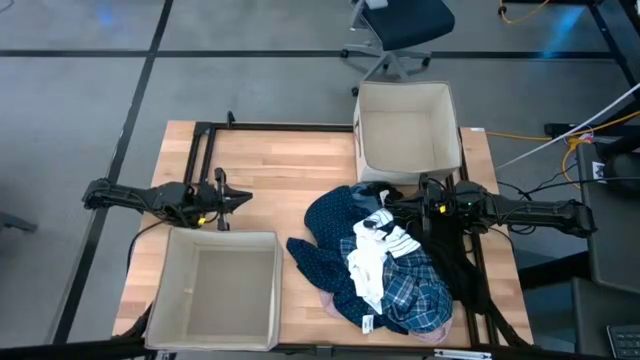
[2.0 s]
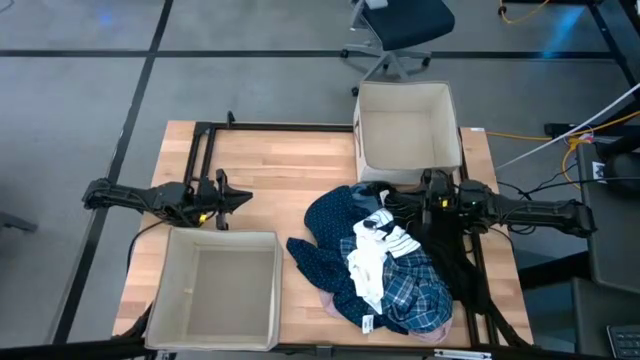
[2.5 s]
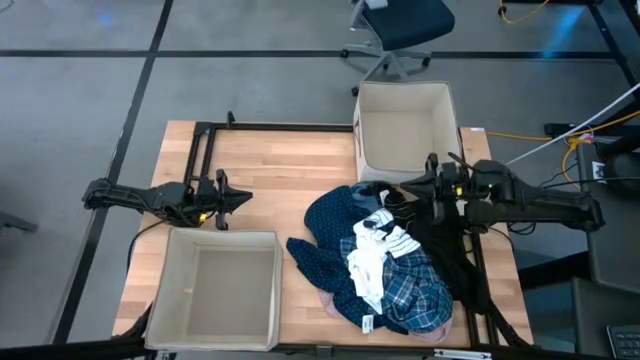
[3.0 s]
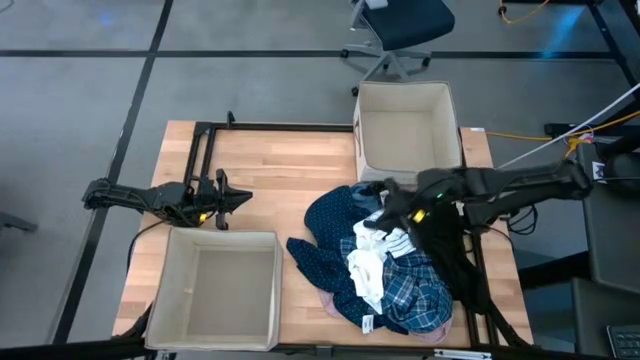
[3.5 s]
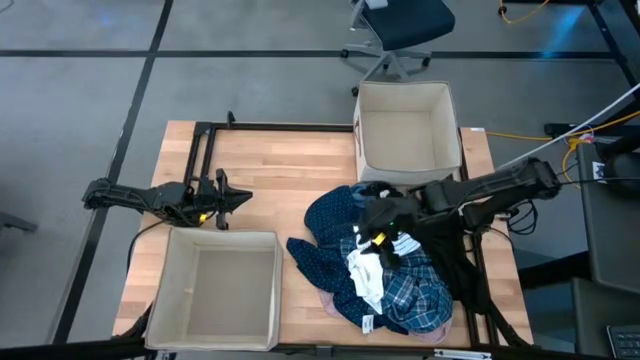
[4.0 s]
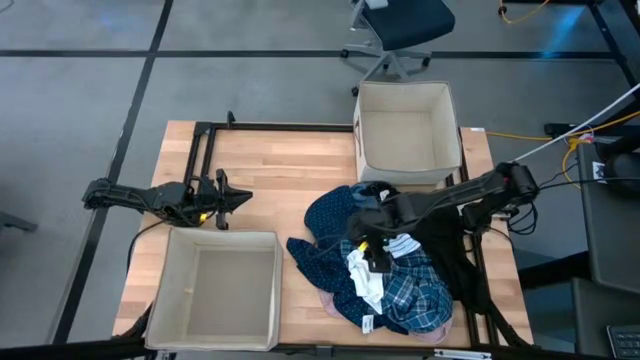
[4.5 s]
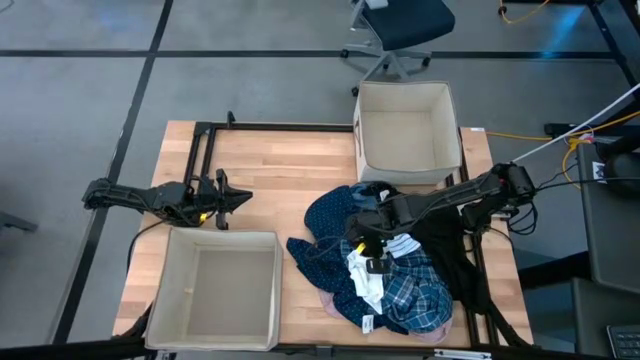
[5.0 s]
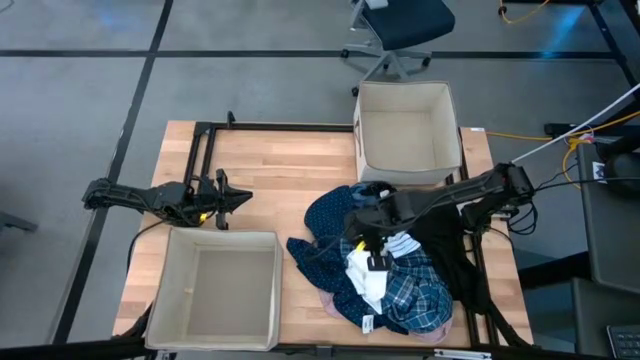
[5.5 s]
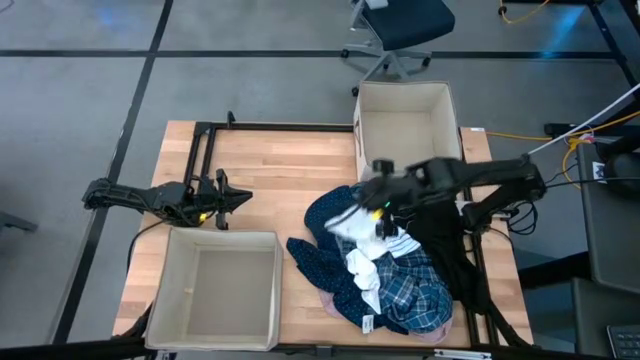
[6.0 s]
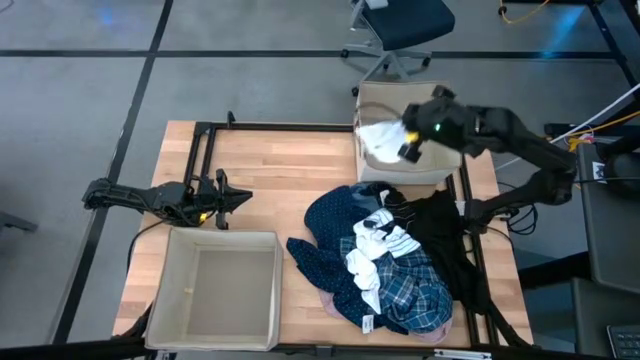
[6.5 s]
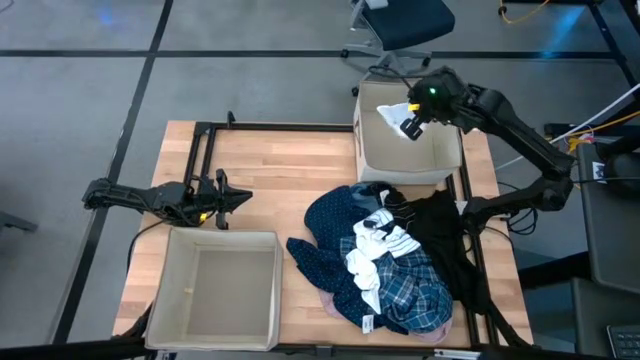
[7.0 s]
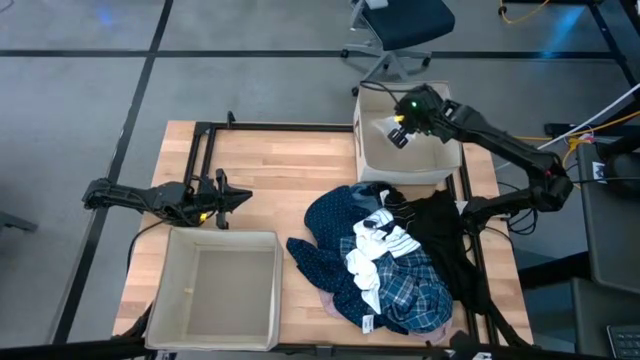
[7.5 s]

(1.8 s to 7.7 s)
Task: Sort clothes
Put the white sock into the top laundry organizer

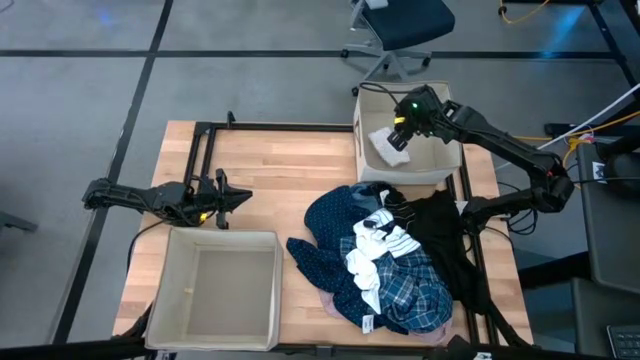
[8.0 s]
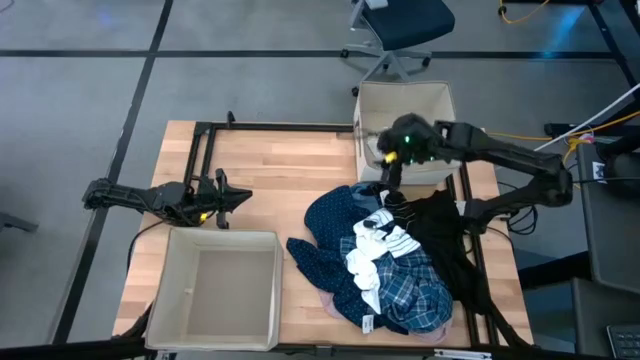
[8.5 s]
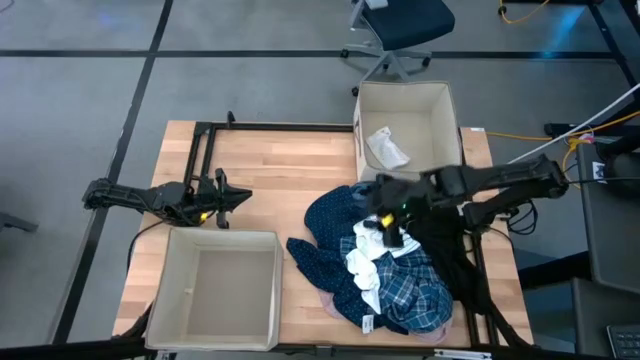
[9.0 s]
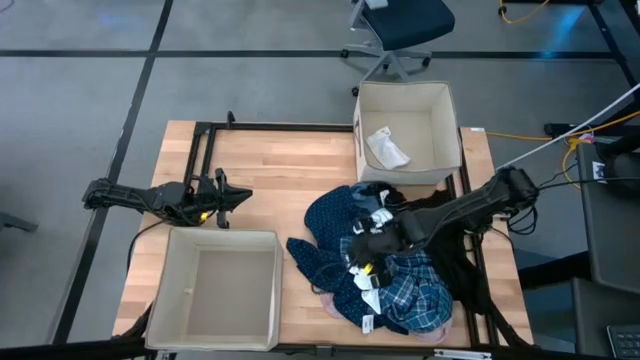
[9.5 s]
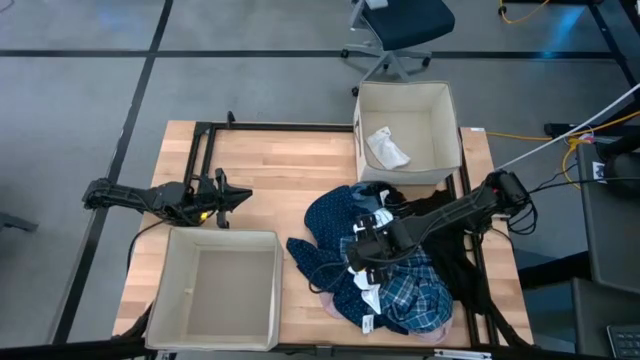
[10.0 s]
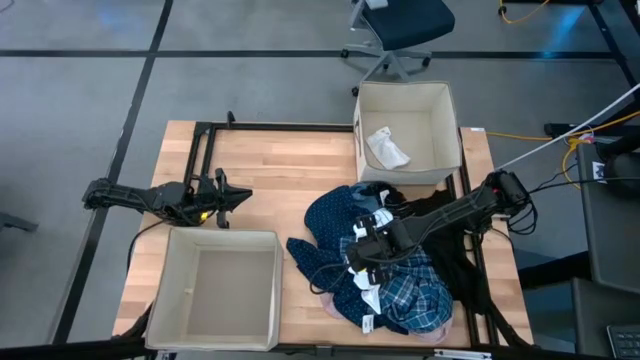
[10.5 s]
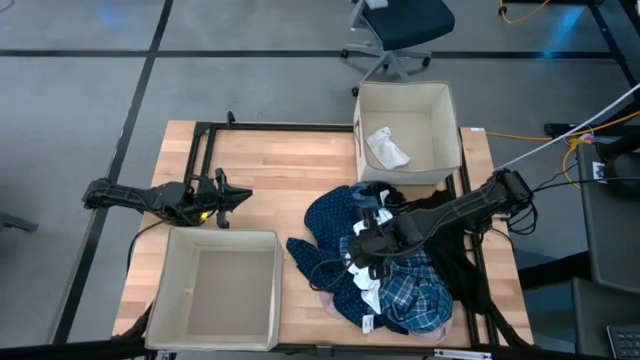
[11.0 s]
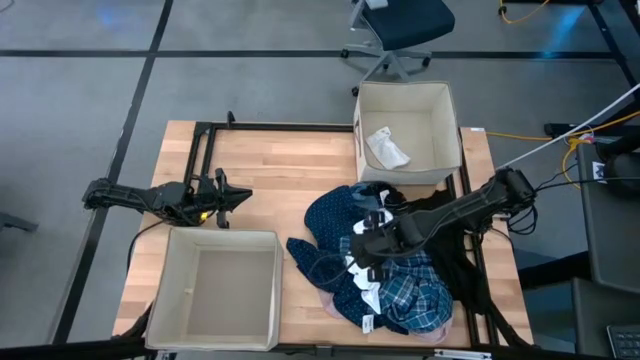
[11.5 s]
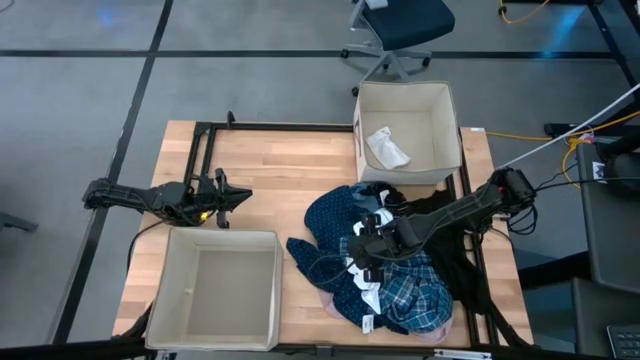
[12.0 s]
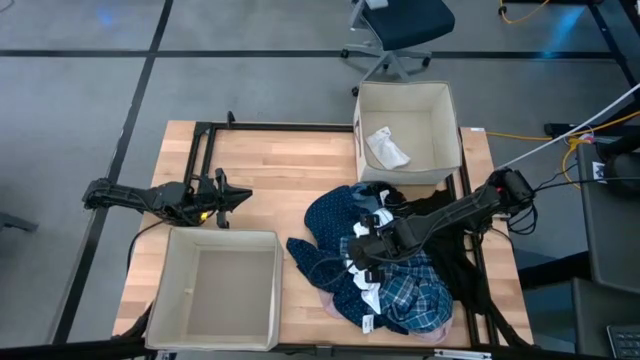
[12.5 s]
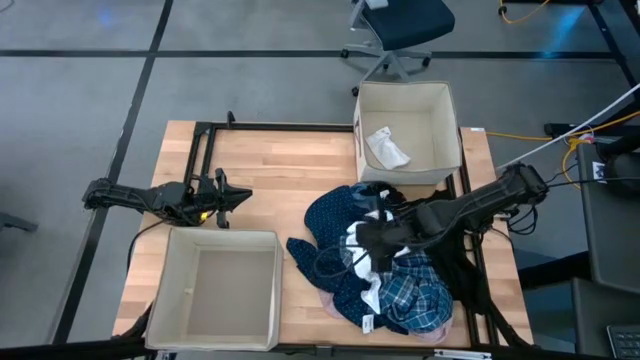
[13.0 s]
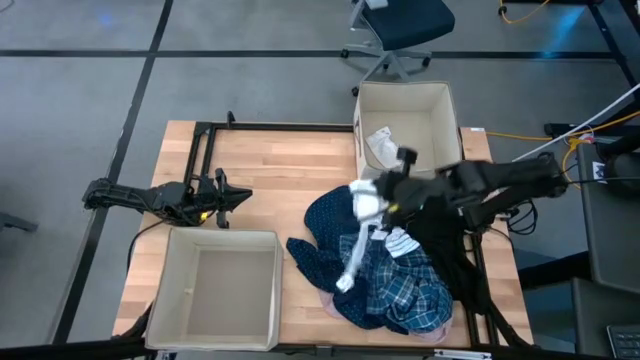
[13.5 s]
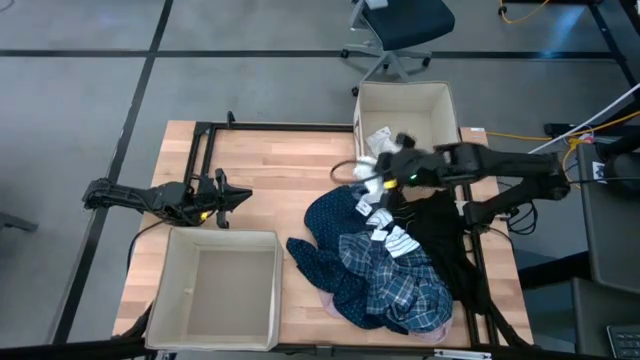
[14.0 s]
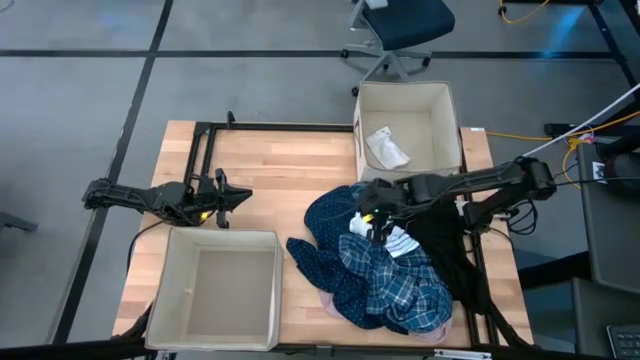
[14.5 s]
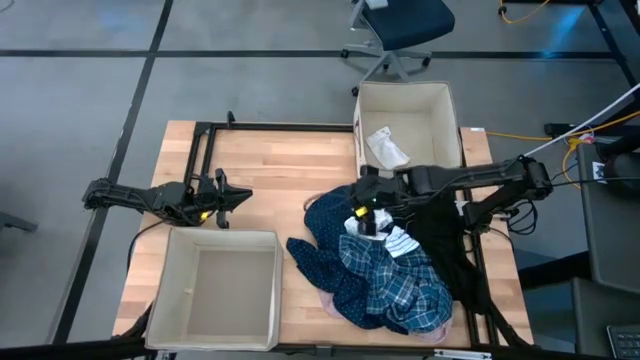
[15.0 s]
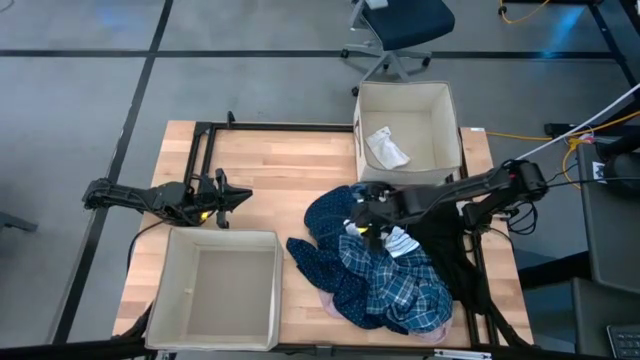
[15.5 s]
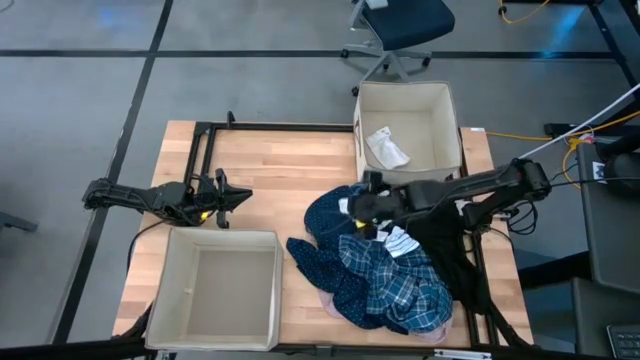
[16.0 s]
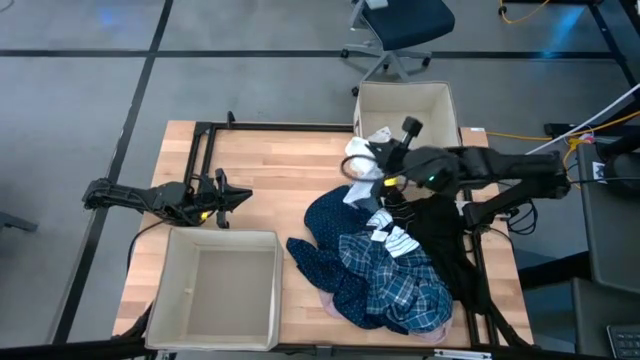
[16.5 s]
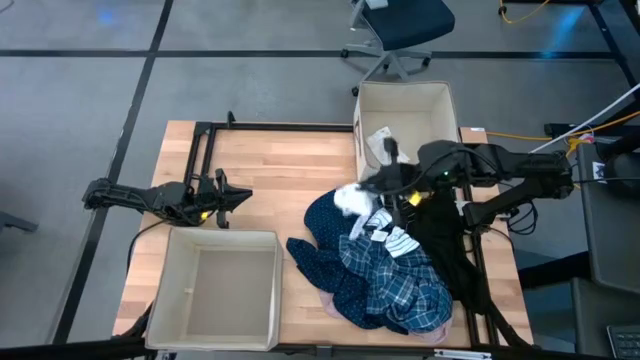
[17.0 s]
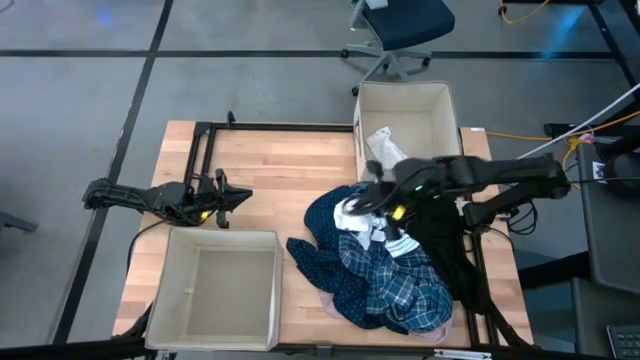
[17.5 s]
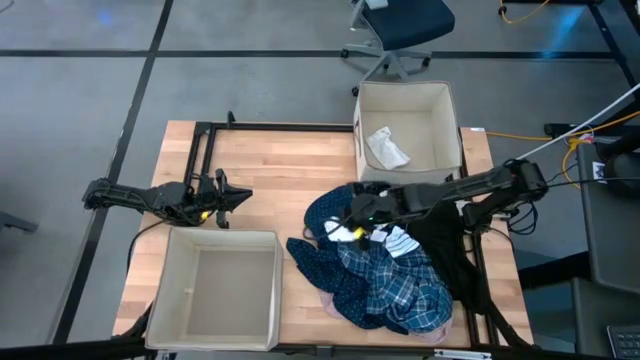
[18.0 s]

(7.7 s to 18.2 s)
Put the white sock into the top laundry organizer

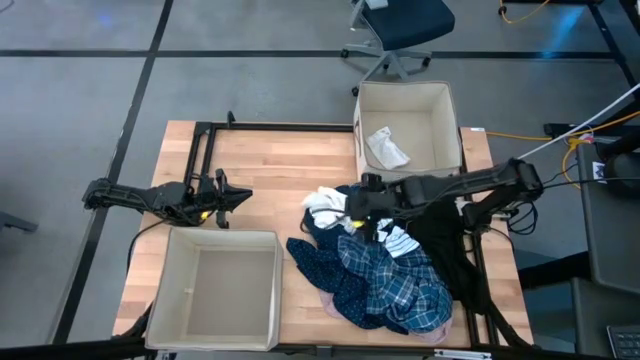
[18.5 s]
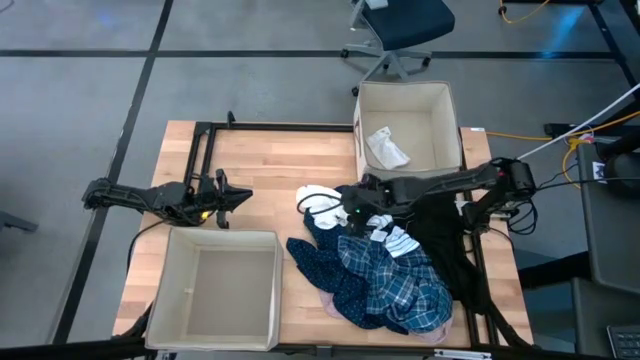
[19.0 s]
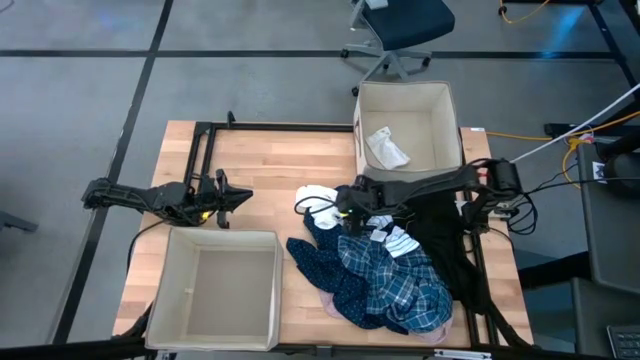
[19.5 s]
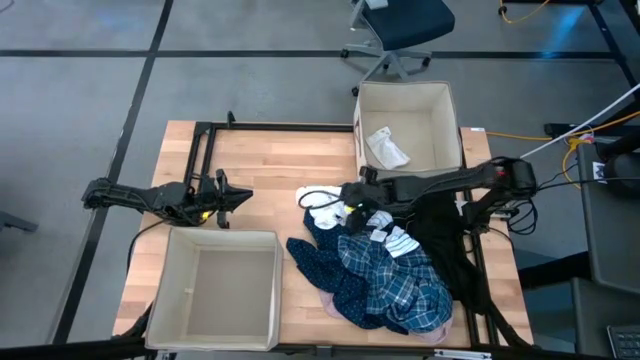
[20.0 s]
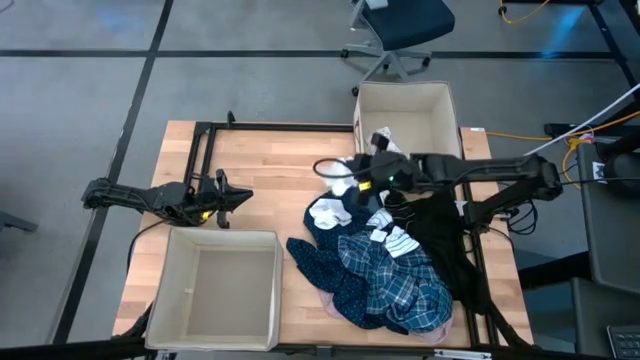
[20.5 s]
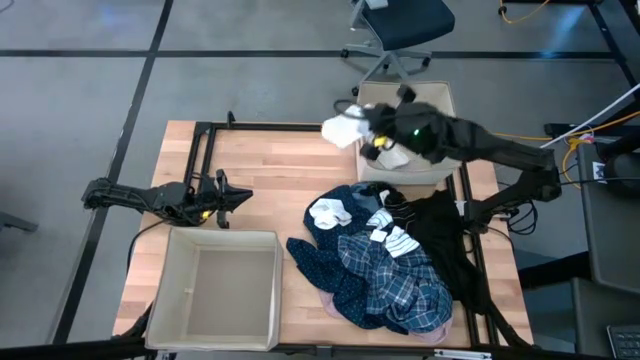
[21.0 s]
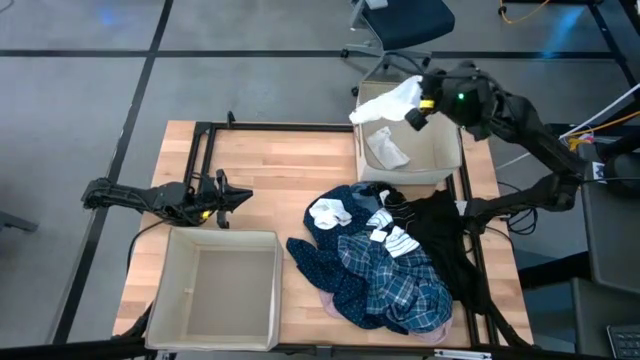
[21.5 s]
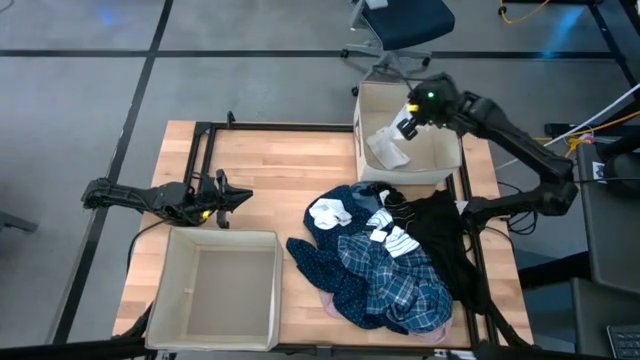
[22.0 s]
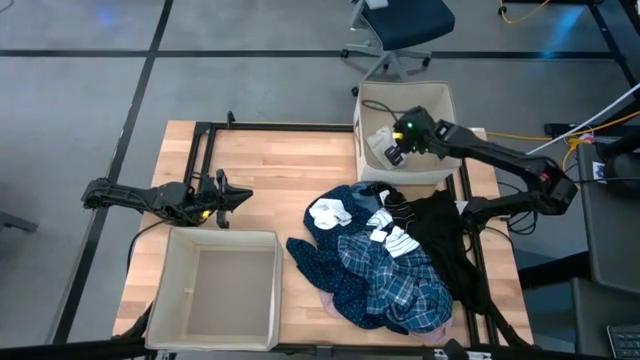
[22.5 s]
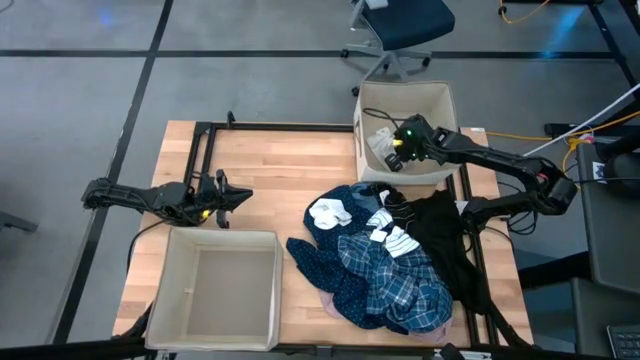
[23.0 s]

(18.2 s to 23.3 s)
Put the white sock into the top laundry organizer
